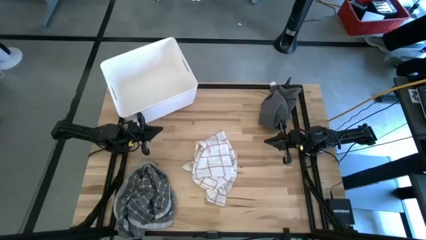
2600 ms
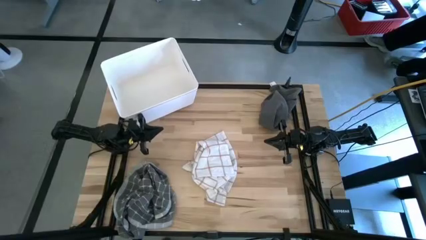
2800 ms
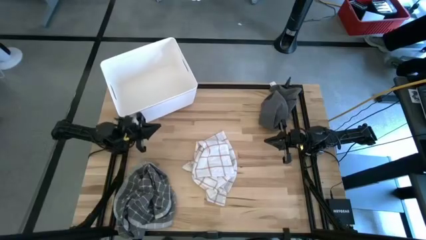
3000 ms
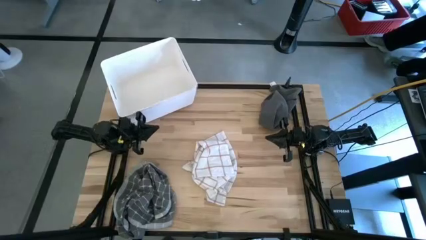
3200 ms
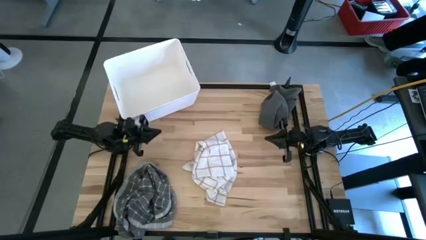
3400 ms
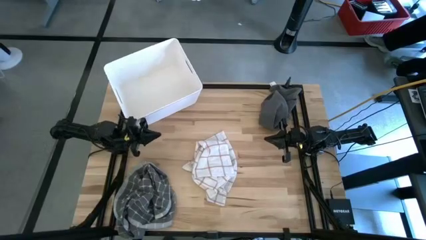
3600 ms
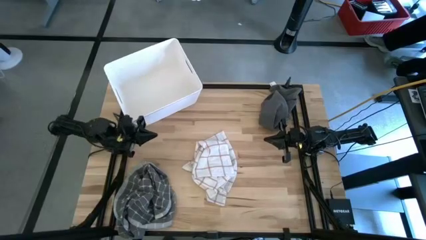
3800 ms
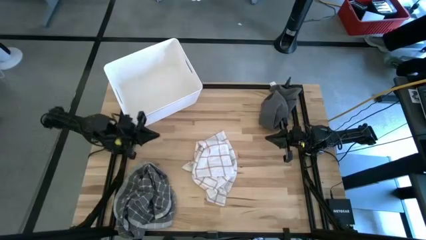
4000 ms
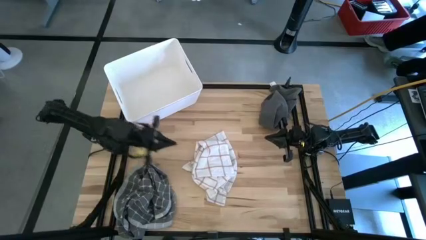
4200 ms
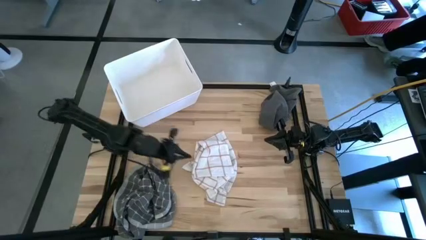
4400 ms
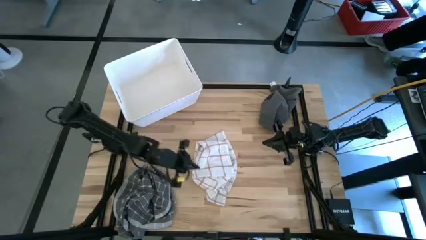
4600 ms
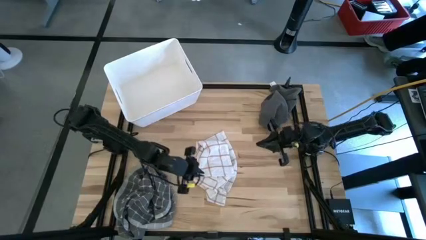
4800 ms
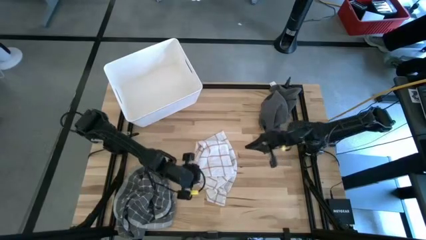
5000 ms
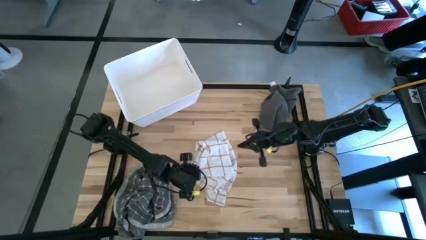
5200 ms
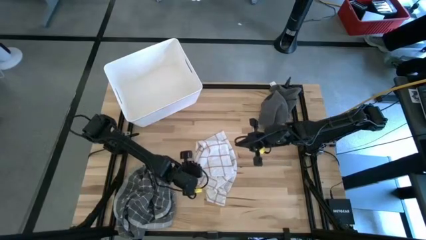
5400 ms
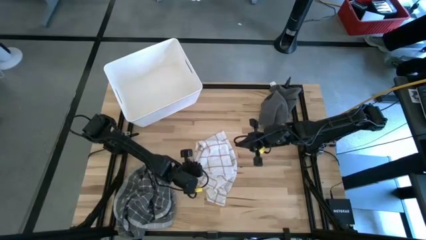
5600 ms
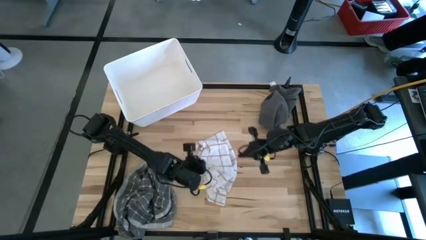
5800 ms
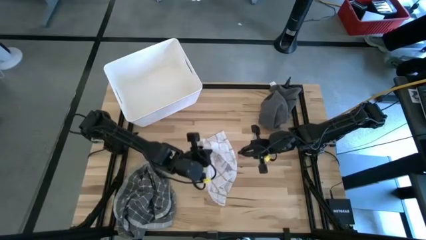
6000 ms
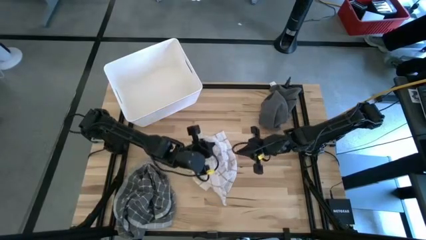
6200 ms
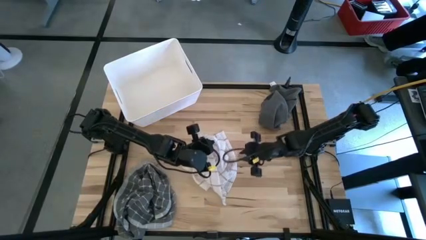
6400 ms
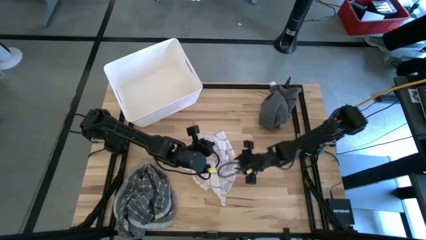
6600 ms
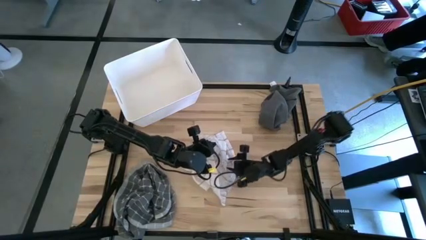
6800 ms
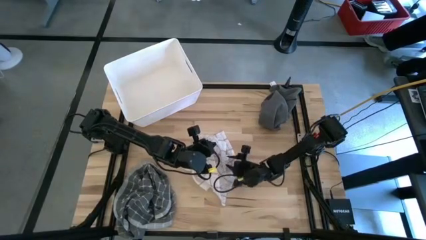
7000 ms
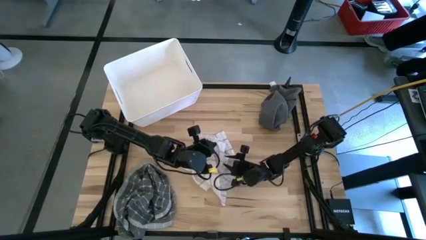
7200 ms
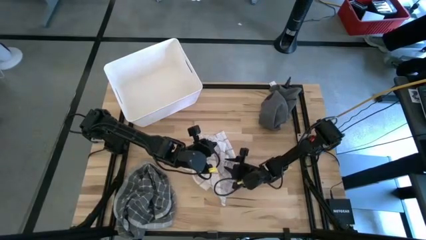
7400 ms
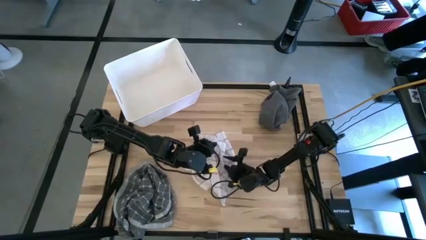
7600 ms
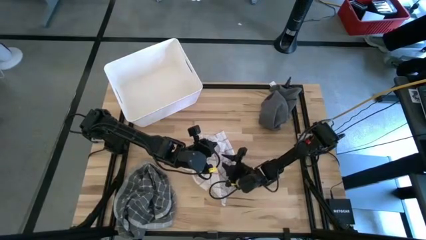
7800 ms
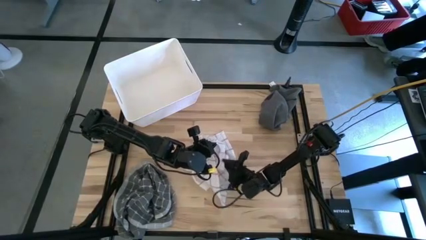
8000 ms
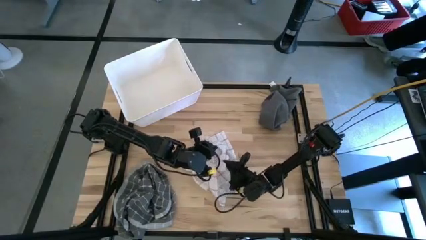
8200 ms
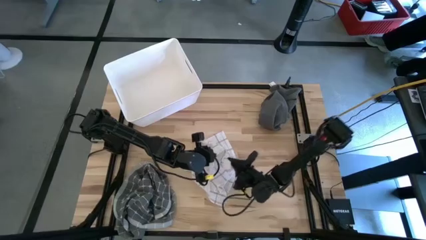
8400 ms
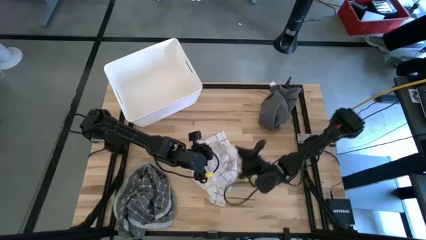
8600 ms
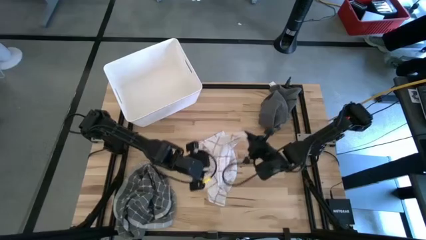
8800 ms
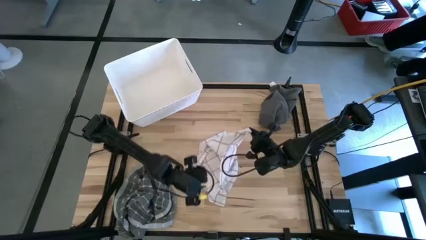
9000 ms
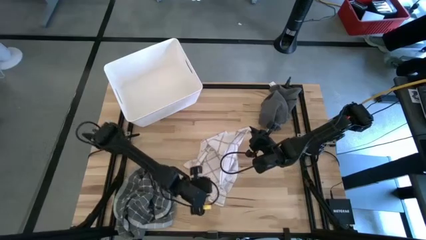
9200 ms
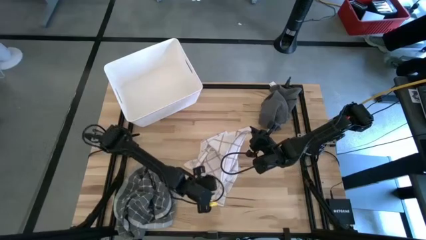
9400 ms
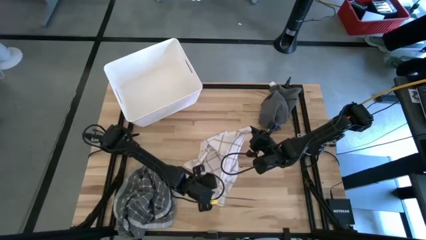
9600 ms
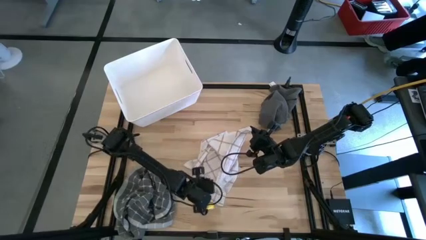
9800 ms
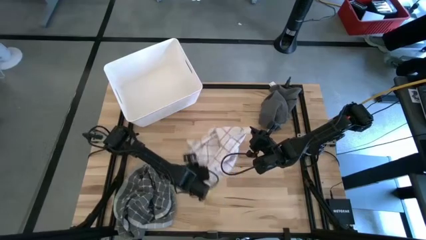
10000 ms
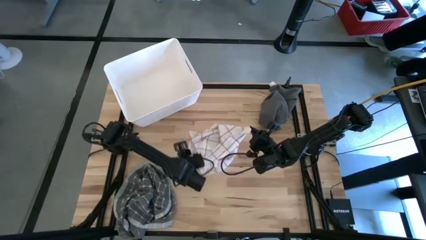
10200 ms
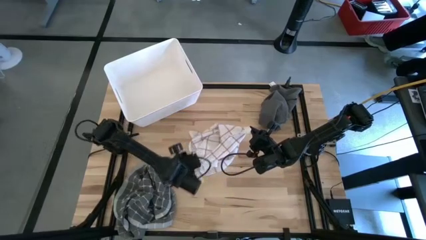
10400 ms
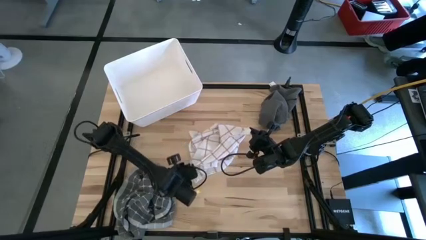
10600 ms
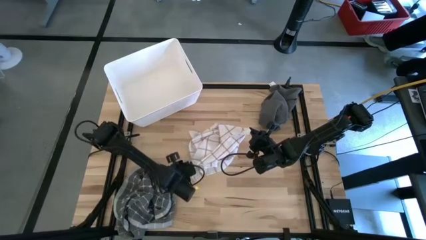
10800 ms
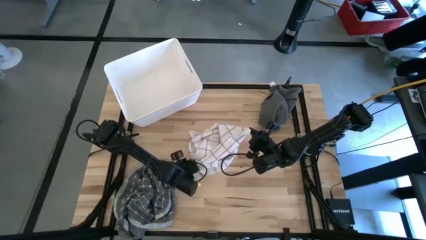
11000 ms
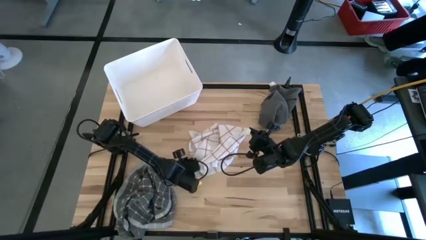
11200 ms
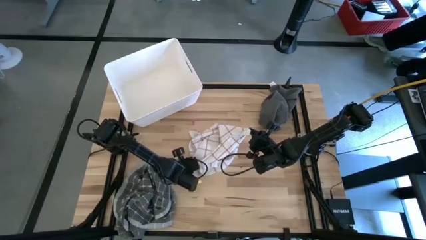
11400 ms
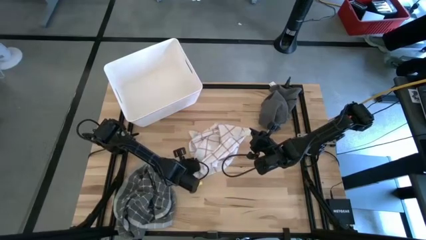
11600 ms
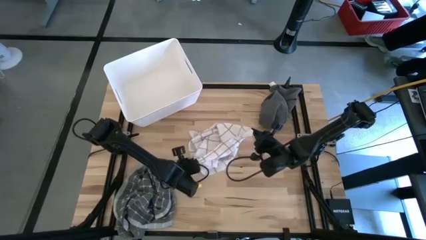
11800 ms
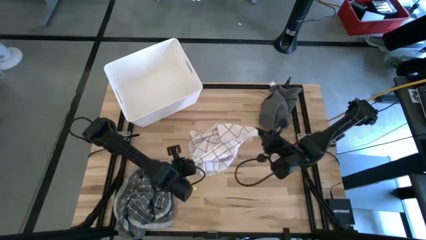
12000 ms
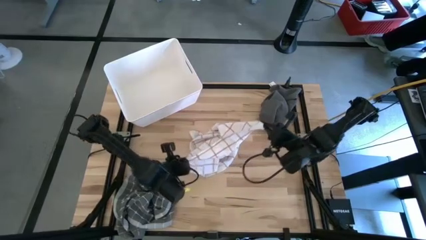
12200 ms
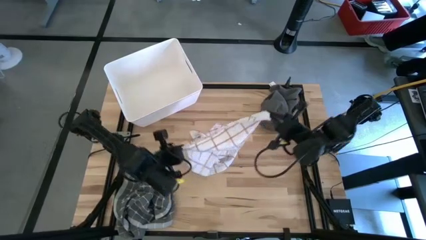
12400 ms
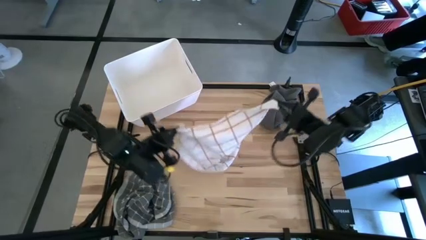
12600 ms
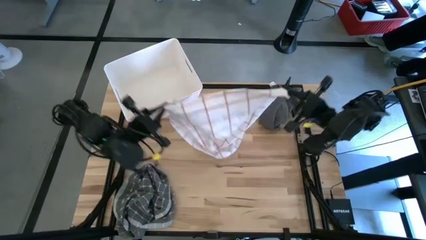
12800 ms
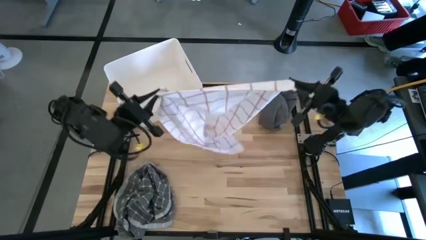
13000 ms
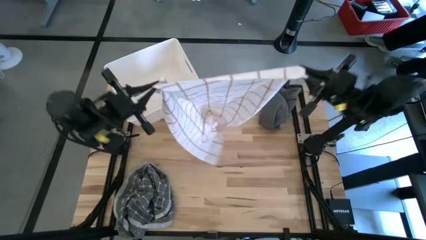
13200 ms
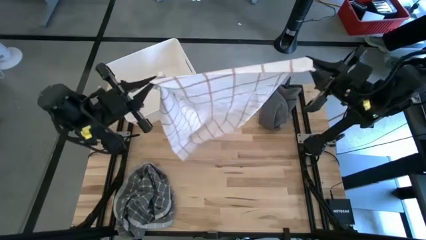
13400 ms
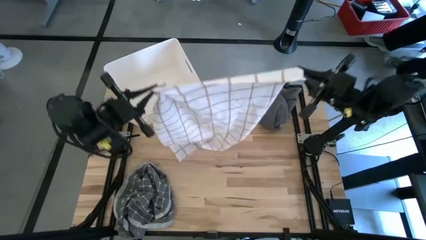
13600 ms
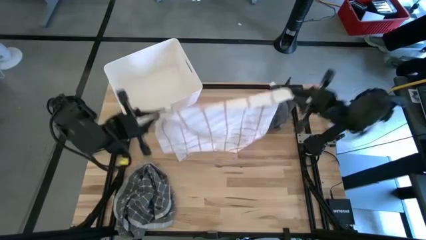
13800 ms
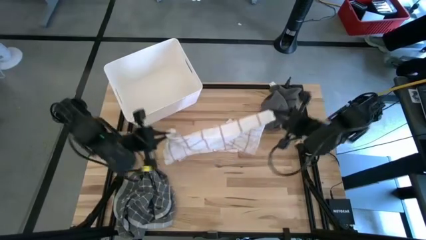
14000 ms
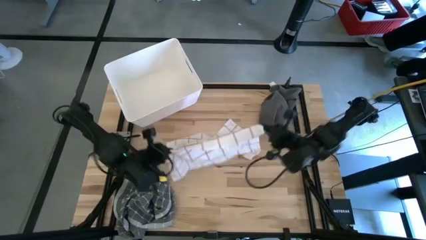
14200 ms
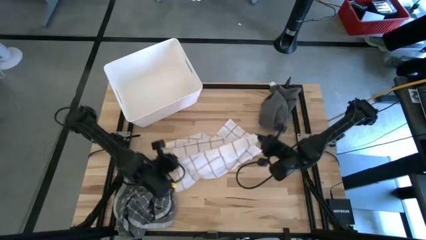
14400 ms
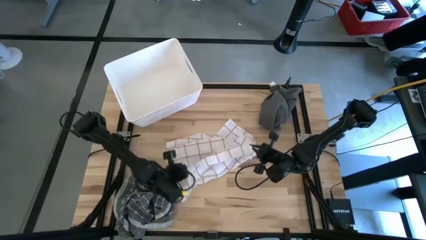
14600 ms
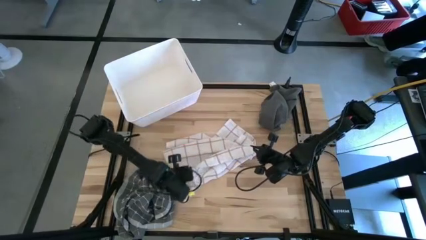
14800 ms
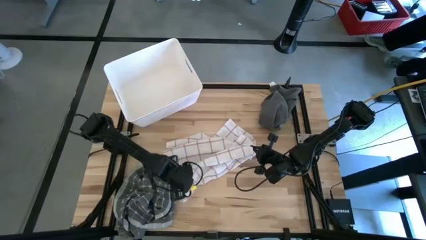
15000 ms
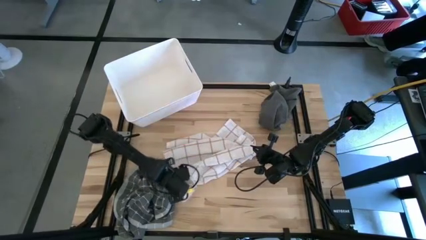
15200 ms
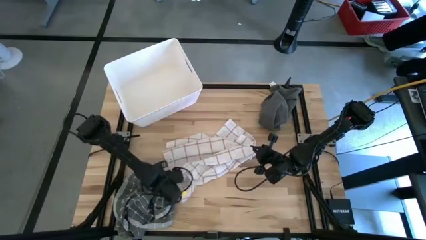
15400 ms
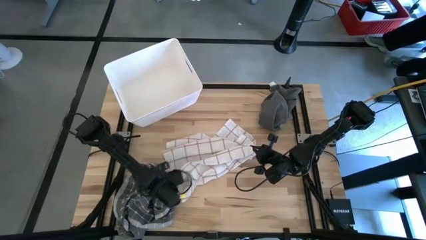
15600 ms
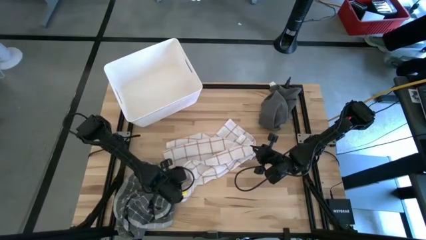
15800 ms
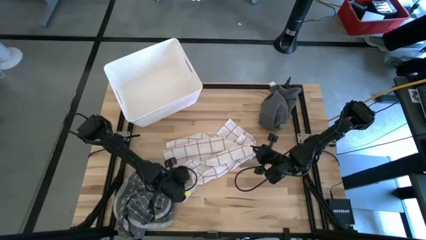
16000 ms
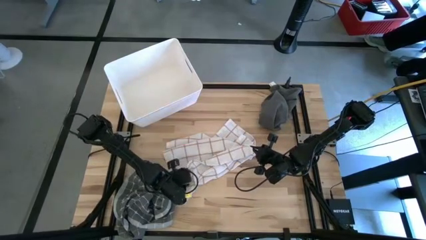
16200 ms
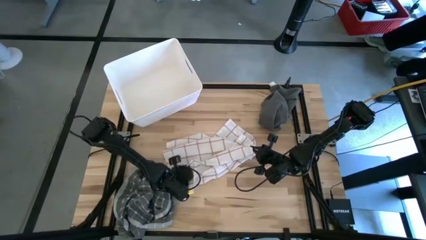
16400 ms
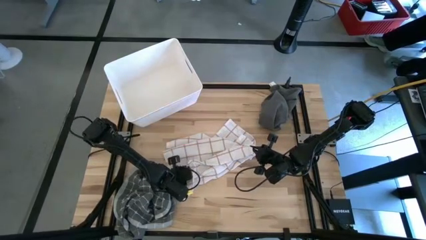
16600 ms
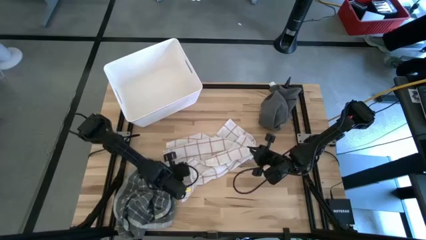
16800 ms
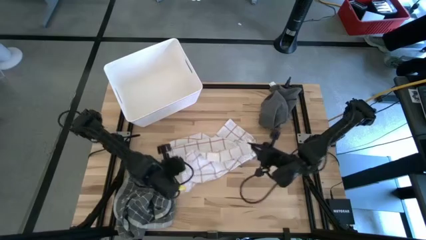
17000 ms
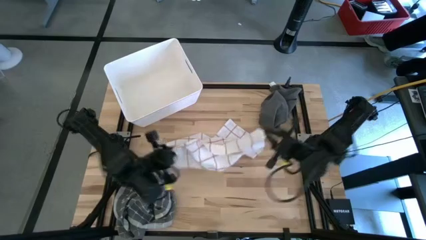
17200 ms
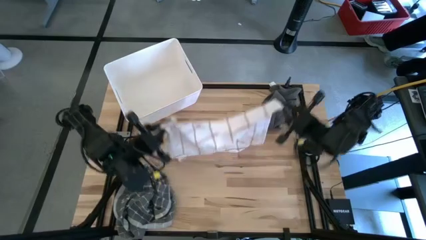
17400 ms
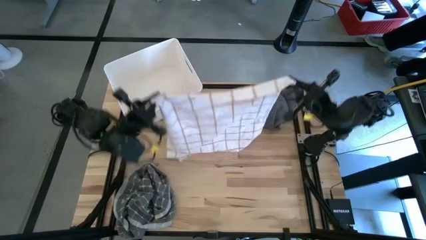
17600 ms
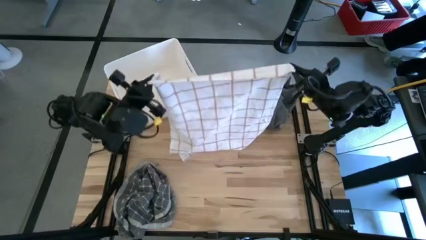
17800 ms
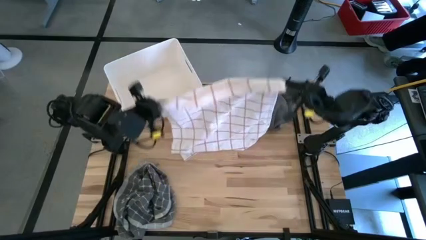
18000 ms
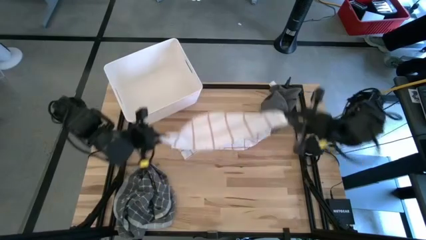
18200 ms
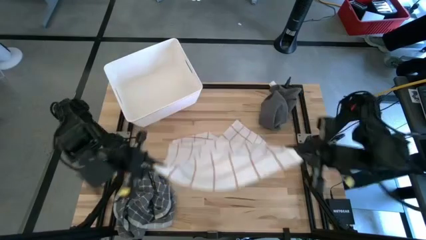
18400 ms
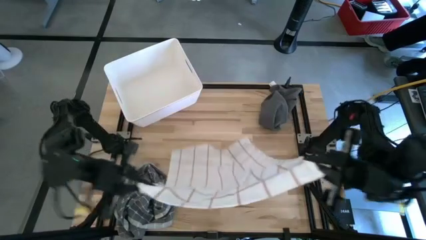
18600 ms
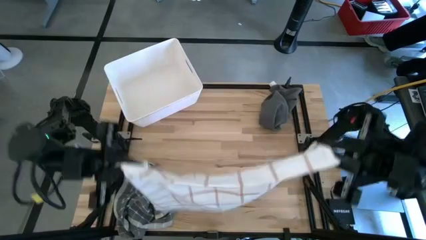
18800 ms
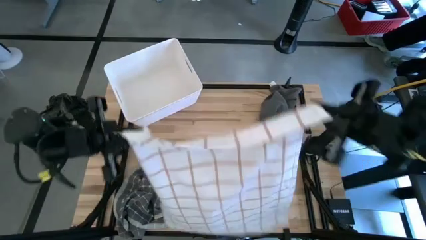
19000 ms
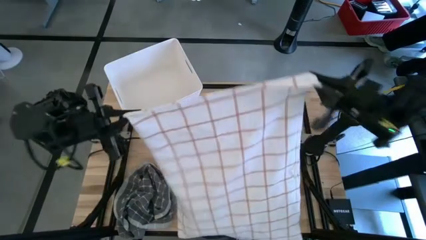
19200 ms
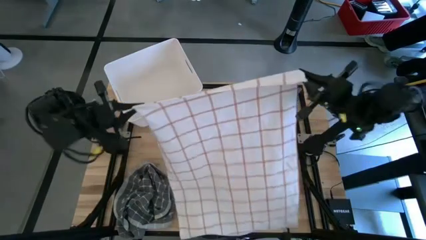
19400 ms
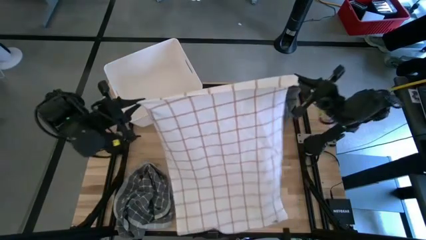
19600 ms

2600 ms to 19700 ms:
Task: Fold towel
Fold the brown-white towel
